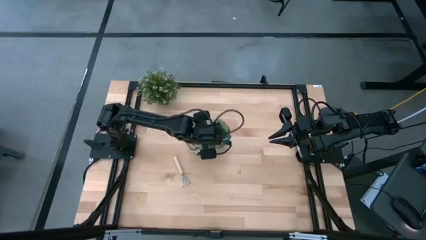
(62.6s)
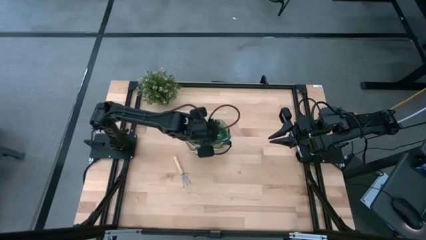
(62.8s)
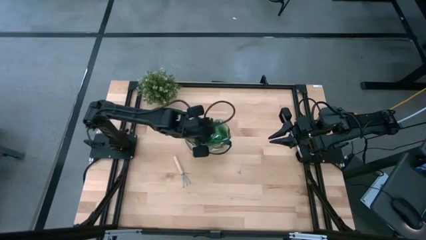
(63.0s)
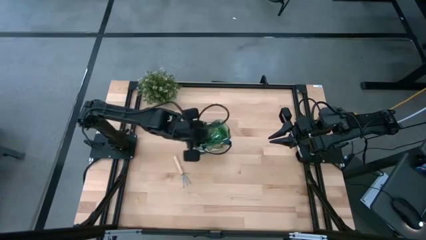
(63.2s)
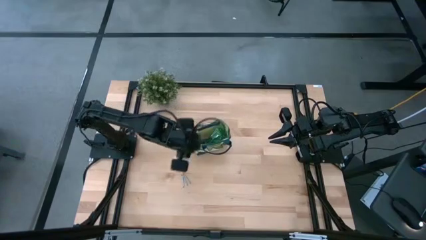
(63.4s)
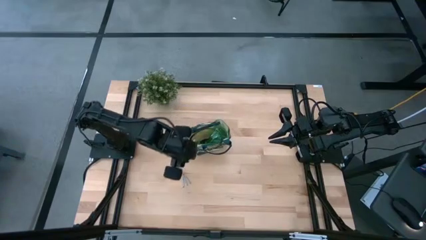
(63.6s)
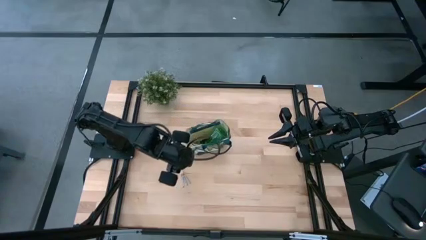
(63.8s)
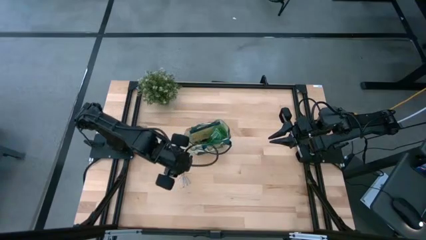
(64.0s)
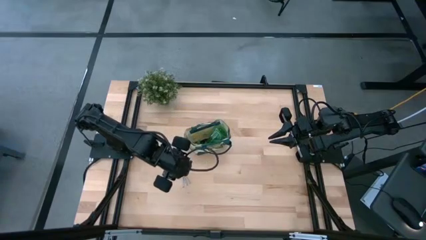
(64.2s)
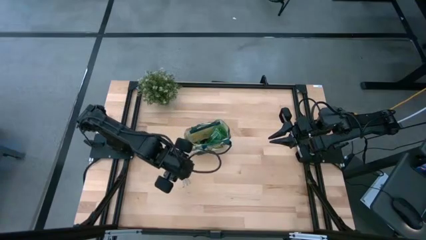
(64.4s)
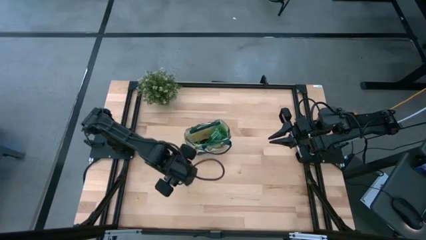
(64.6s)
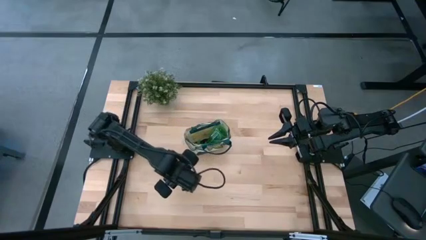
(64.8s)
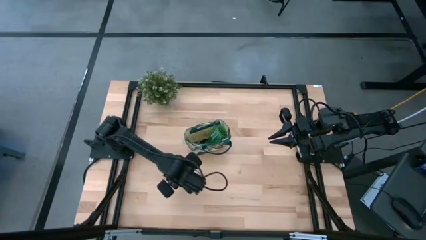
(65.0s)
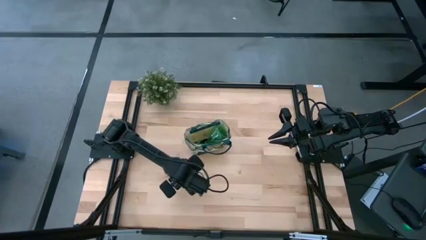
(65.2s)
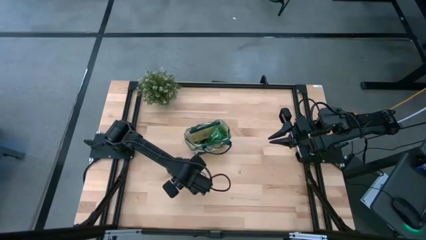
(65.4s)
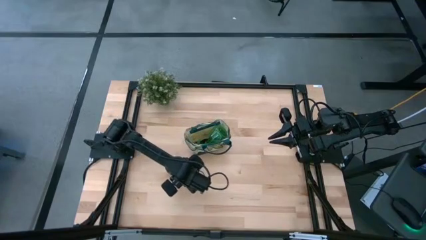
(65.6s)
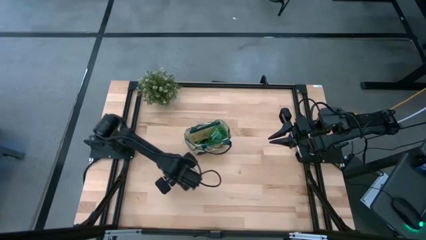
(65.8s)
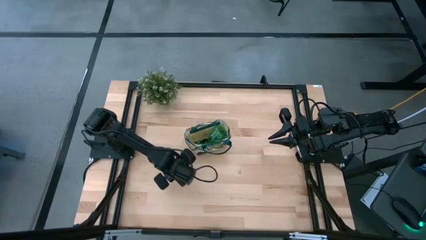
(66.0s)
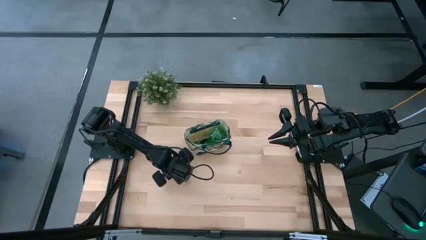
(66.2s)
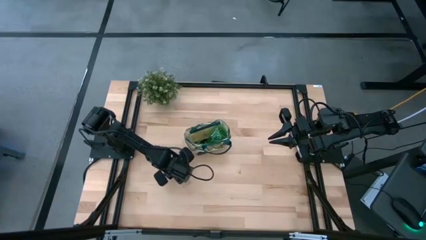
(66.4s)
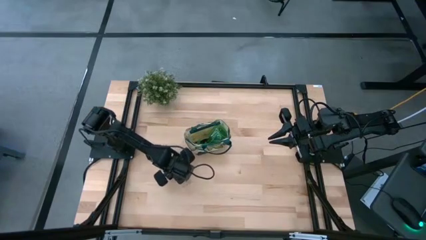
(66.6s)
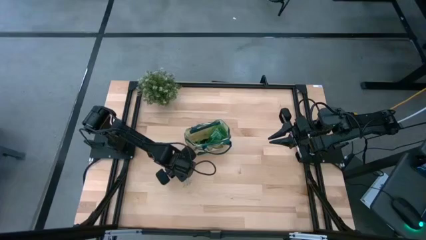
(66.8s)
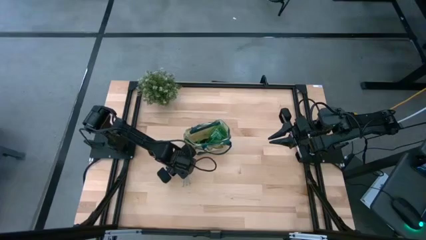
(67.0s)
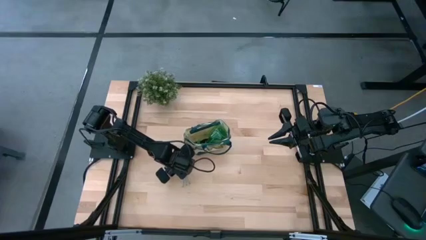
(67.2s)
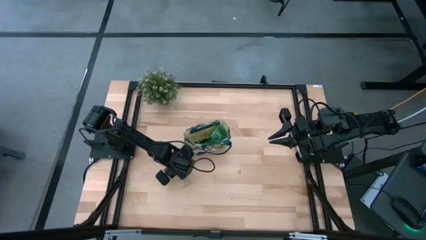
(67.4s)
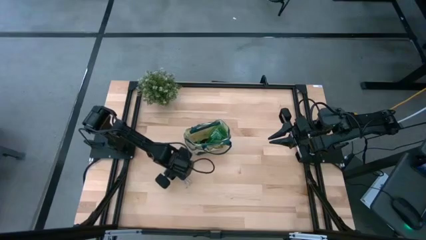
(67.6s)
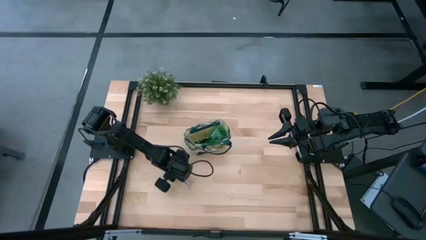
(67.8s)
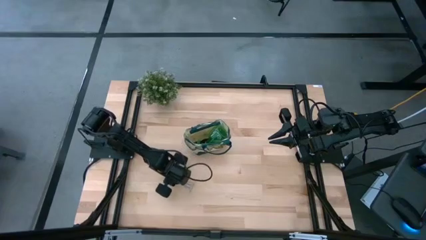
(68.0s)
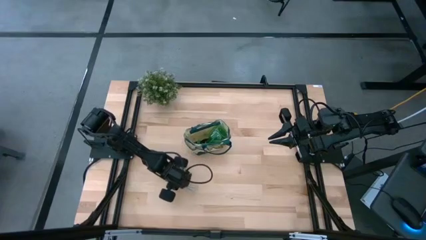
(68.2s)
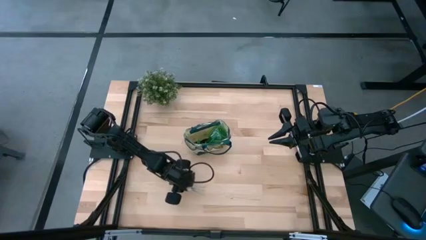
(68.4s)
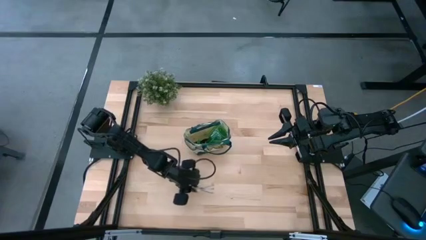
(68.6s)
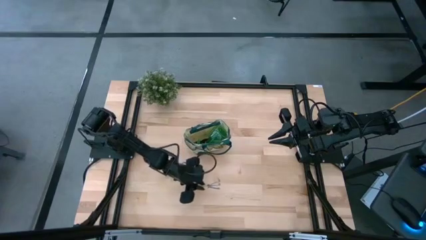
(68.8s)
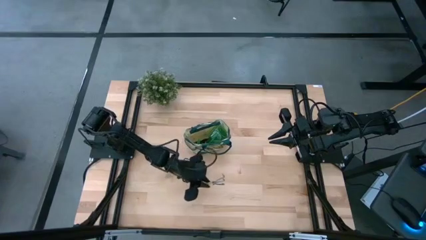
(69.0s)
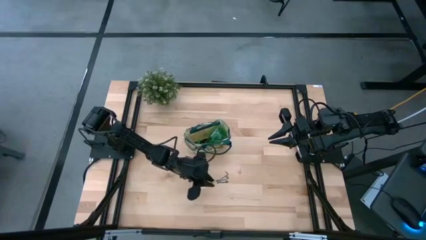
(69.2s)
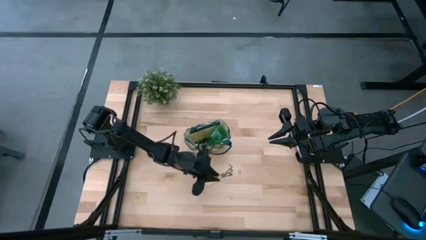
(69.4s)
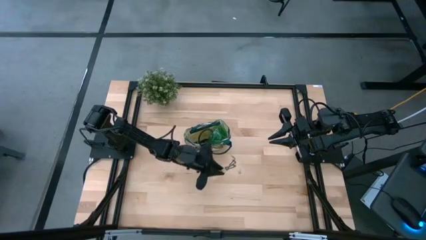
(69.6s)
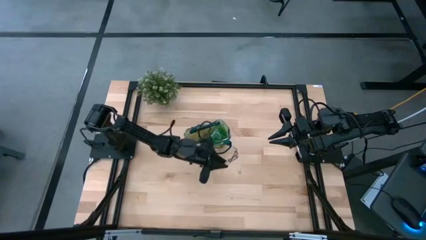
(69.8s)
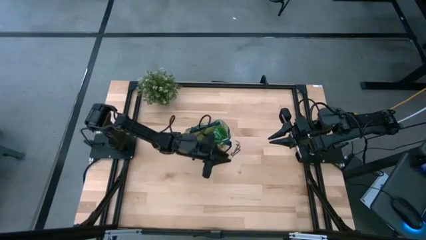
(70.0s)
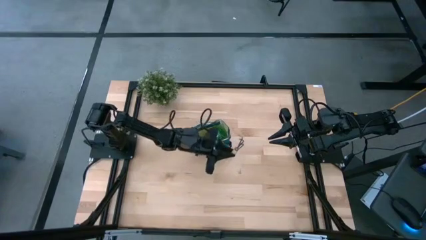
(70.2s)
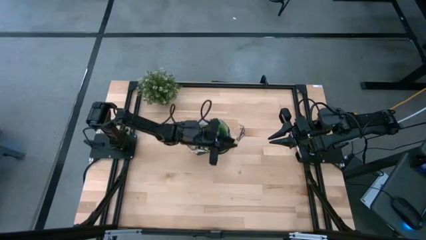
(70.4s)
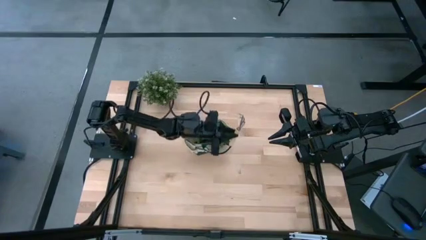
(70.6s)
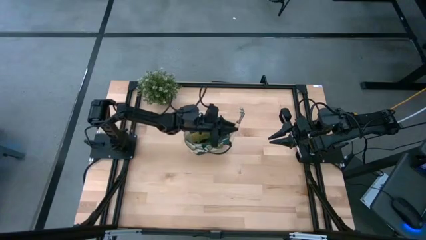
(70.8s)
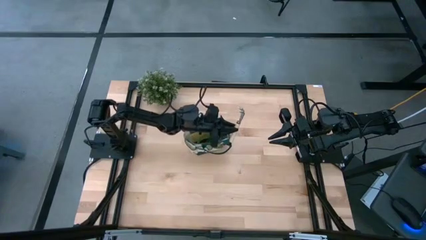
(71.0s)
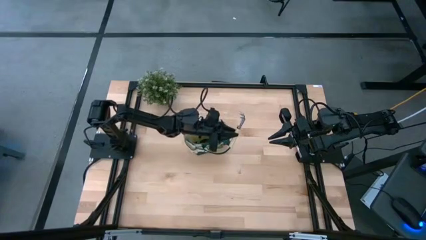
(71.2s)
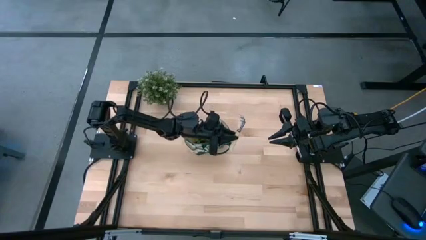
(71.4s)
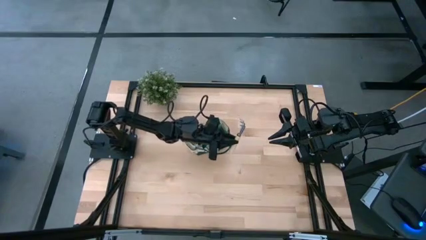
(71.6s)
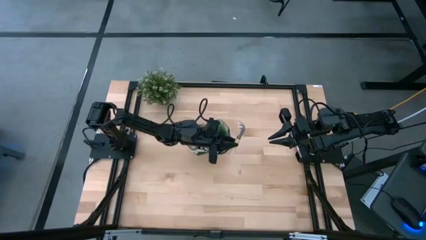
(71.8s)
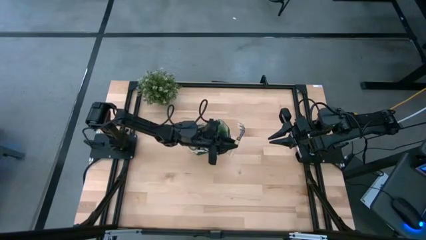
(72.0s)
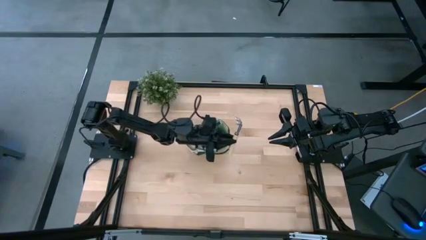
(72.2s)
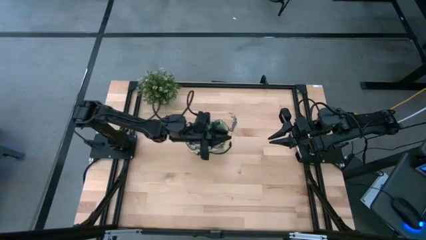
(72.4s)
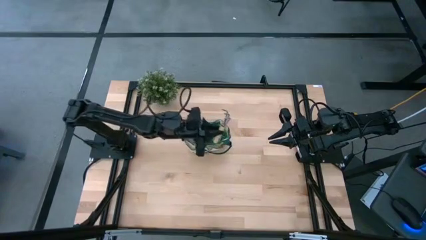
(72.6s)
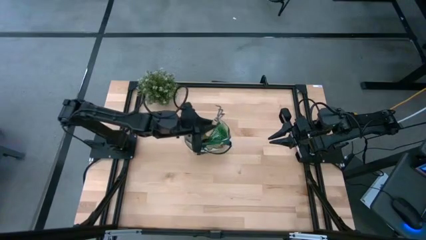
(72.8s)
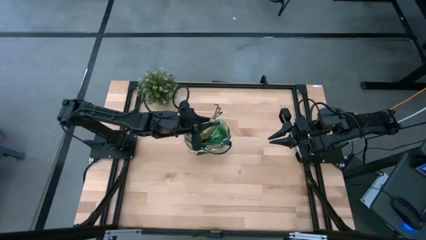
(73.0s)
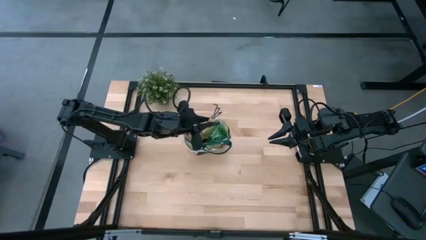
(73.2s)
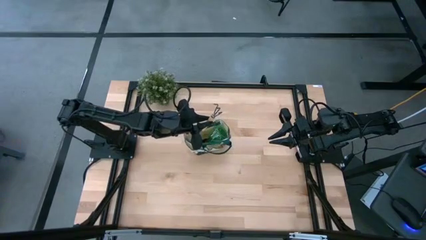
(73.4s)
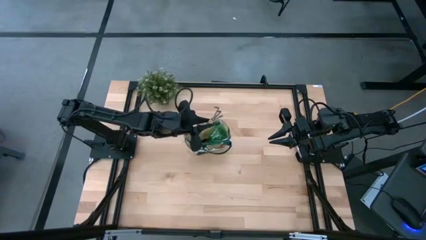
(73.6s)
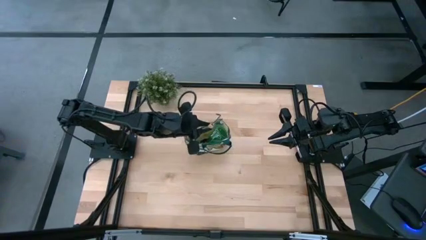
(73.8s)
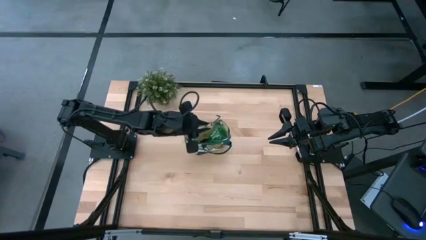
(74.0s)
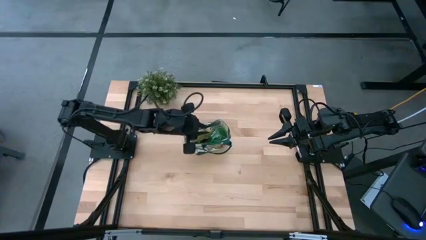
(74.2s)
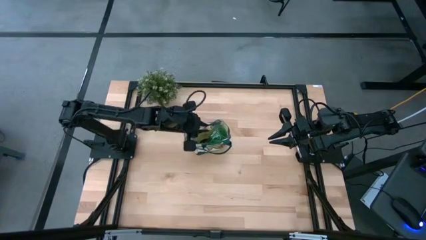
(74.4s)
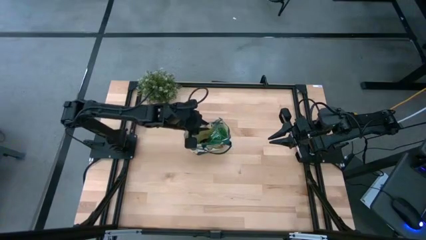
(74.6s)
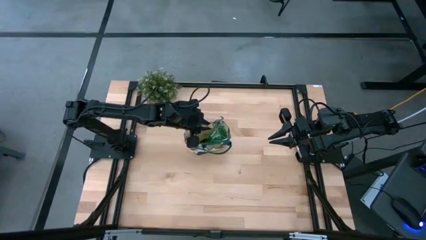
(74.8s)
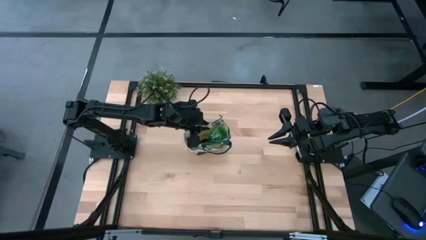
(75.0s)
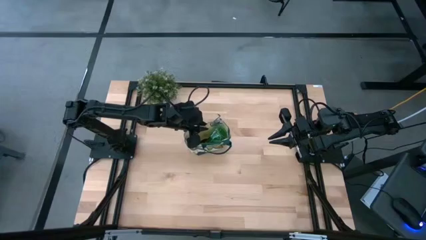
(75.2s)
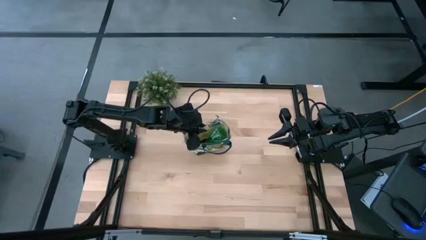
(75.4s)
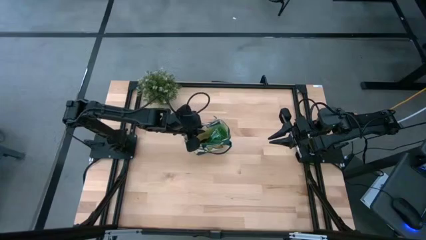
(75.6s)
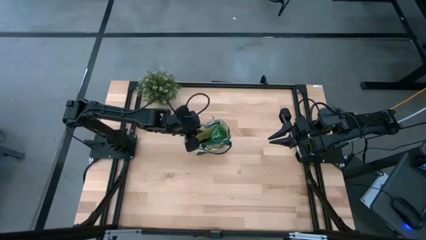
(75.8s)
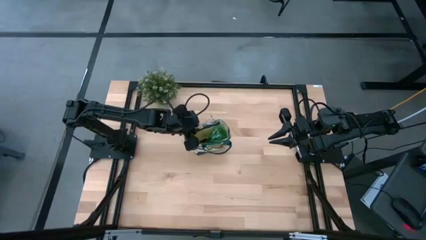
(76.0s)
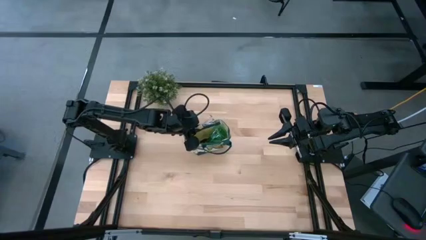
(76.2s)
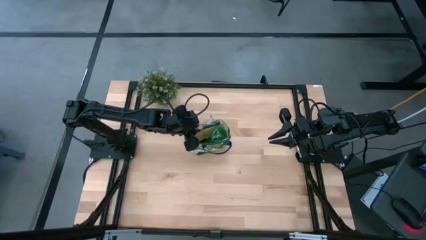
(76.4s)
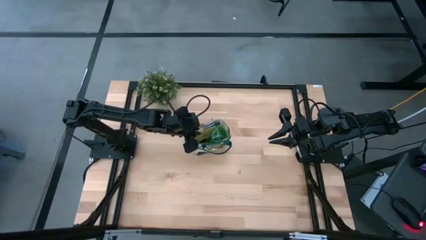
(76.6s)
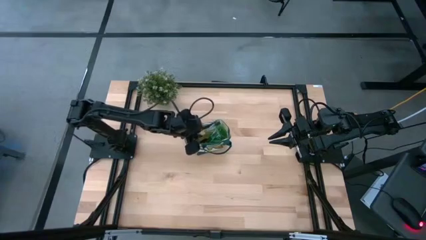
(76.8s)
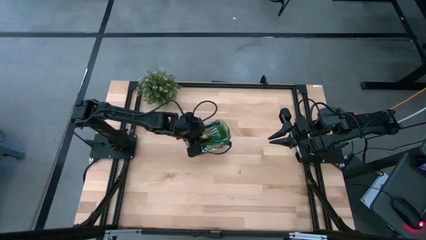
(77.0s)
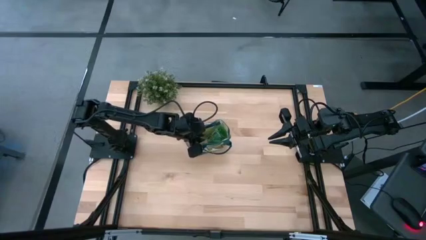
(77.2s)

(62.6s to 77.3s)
Task: Pick & Place Garden tools in Gardening bag
Put the hand rake into the gardening bag

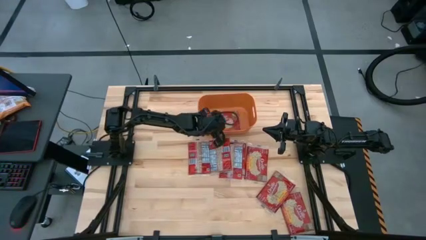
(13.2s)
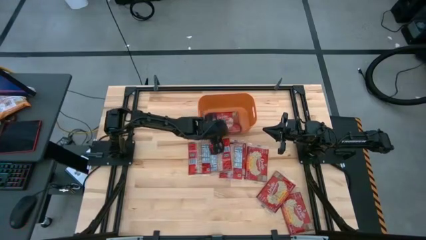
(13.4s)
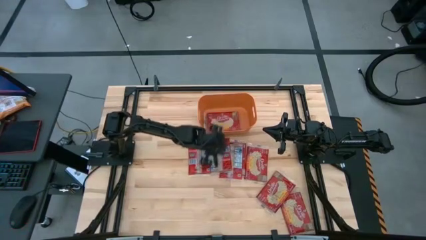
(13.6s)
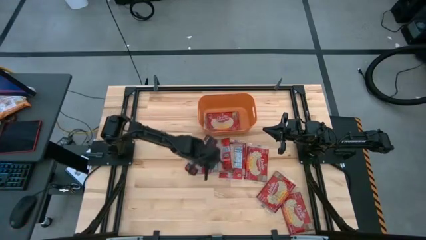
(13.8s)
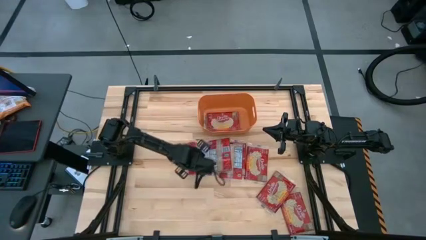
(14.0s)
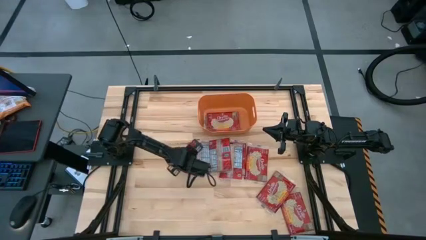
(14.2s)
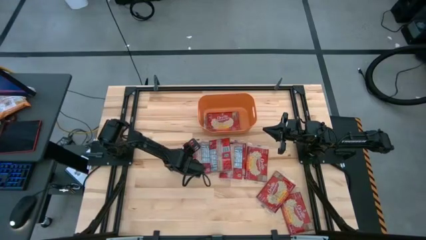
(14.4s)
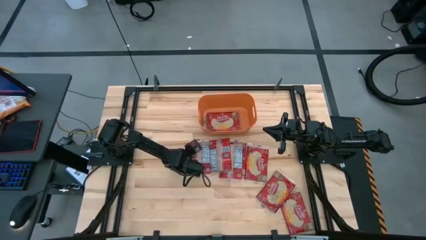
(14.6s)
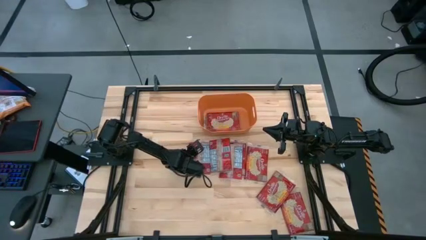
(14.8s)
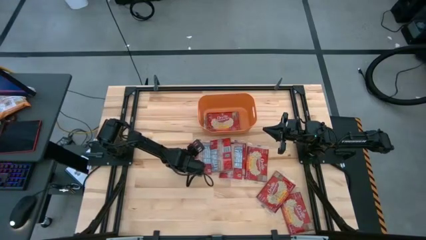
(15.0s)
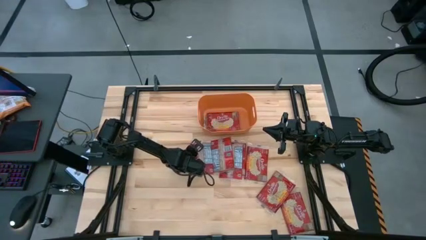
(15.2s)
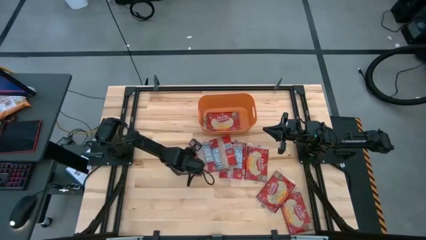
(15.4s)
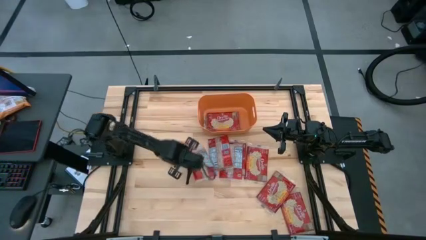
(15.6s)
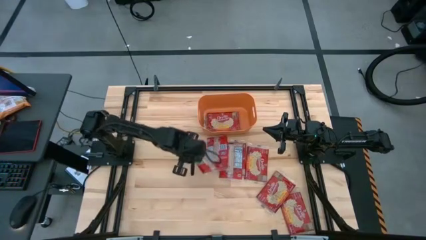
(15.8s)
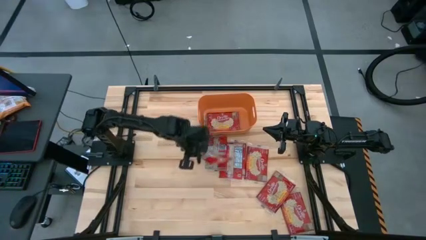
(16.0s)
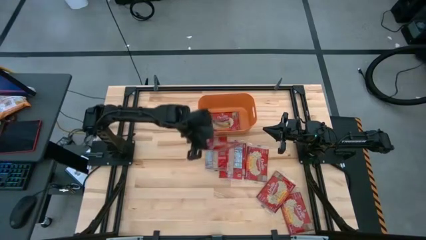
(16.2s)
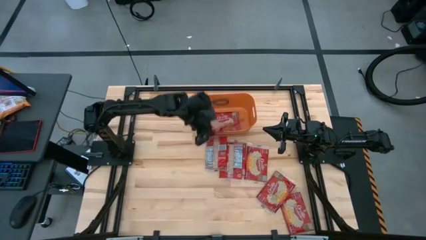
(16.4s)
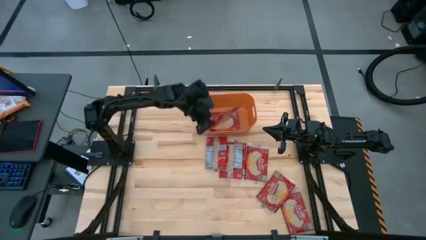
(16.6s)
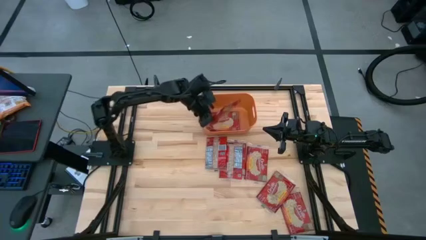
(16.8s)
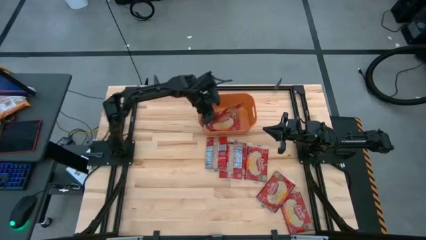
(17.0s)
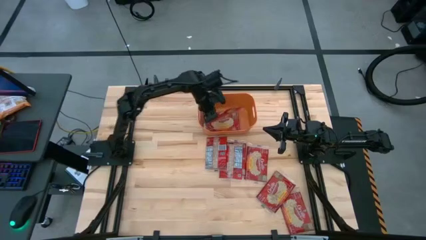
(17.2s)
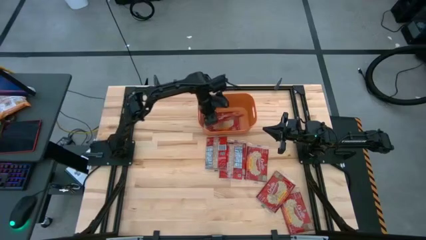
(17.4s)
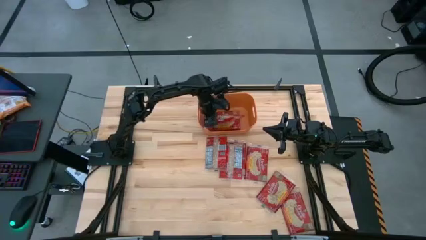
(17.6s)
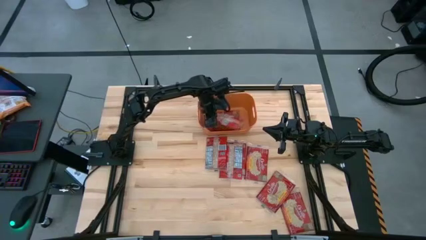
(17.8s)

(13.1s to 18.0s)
Task: Sort popcorn bags into baskets
Put the red popcorn bag into the orange bin
